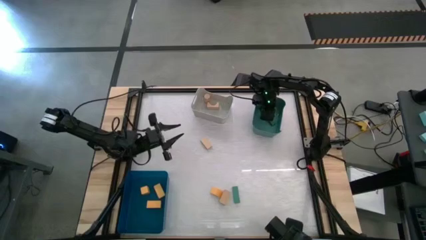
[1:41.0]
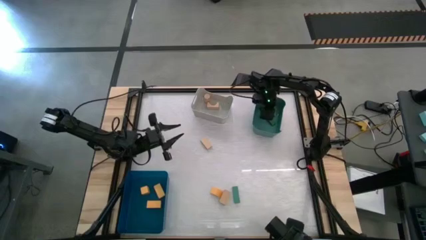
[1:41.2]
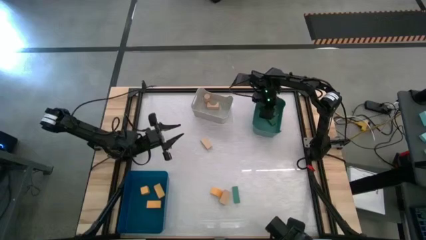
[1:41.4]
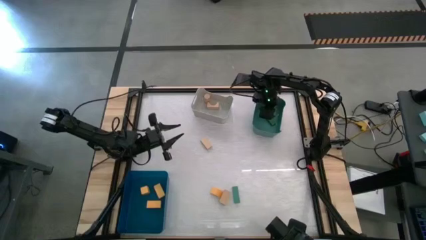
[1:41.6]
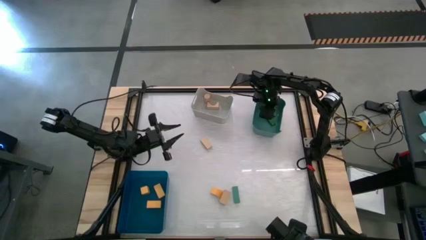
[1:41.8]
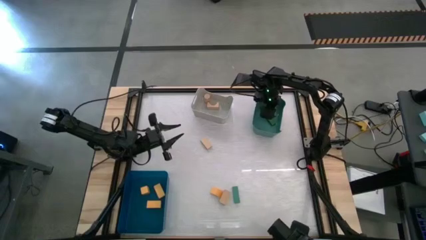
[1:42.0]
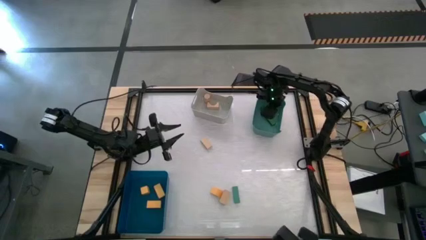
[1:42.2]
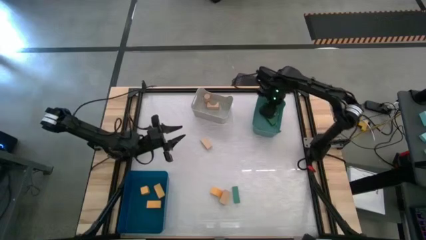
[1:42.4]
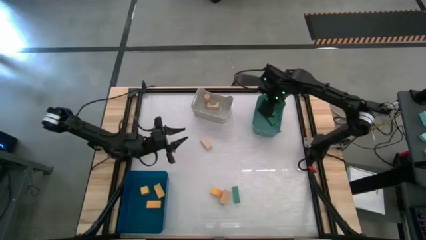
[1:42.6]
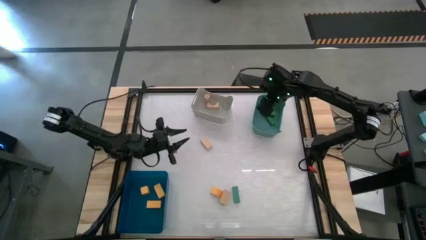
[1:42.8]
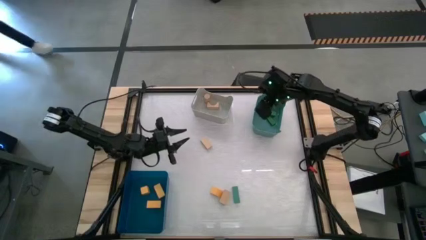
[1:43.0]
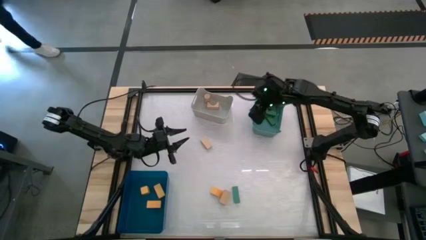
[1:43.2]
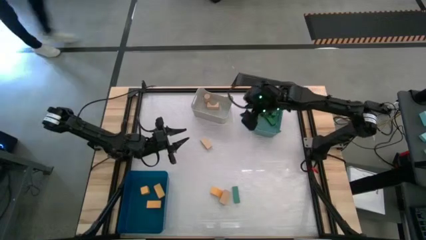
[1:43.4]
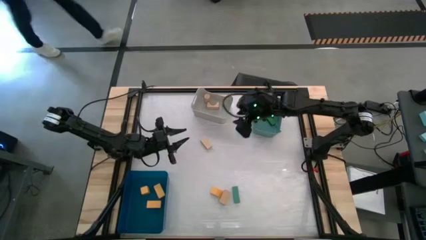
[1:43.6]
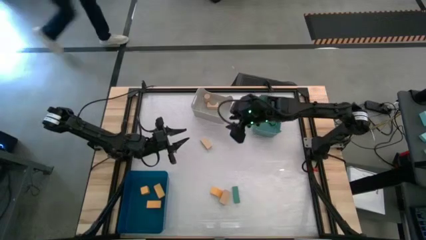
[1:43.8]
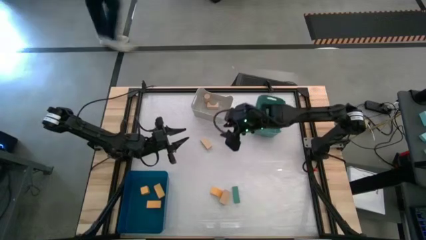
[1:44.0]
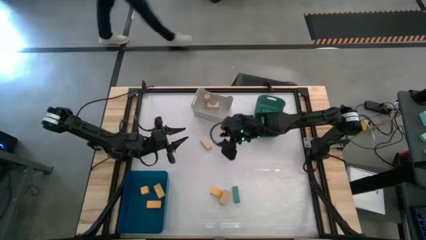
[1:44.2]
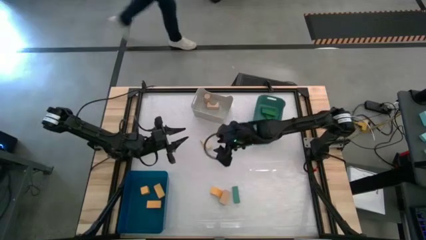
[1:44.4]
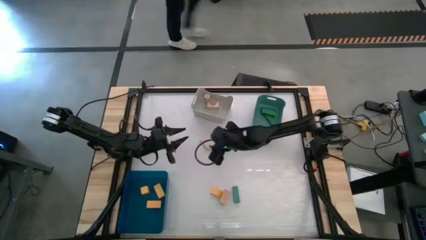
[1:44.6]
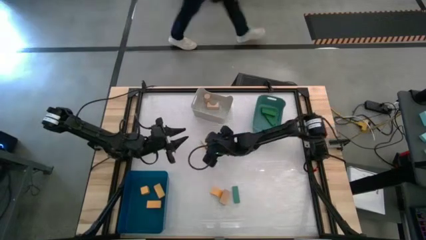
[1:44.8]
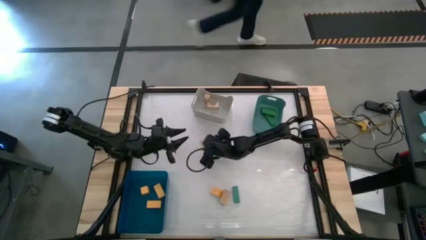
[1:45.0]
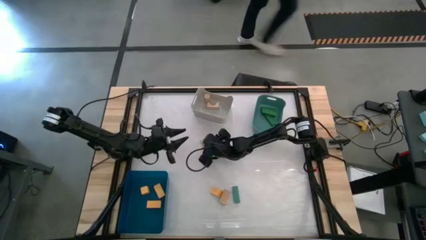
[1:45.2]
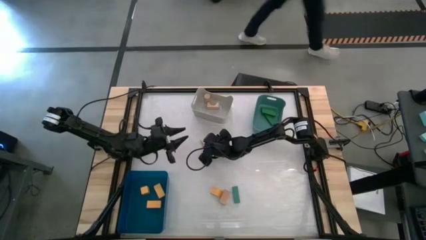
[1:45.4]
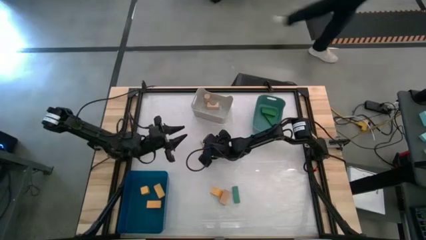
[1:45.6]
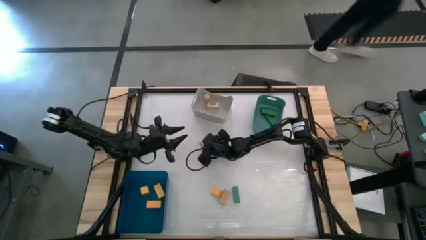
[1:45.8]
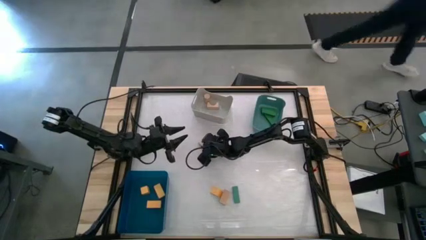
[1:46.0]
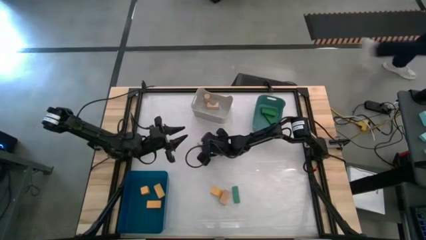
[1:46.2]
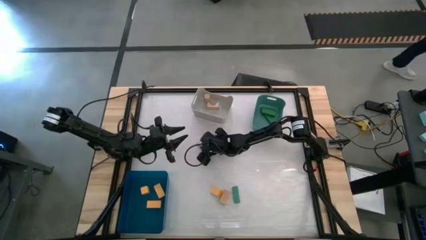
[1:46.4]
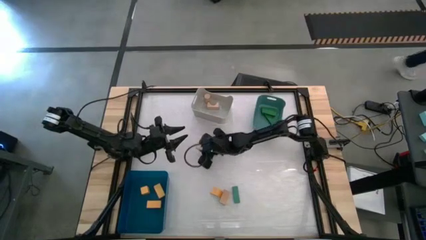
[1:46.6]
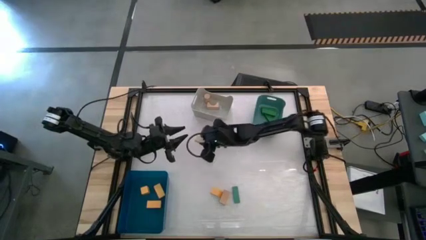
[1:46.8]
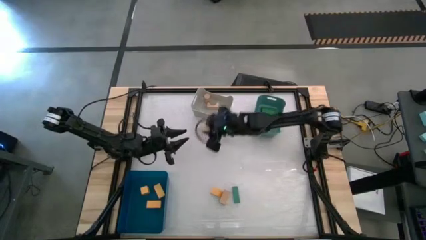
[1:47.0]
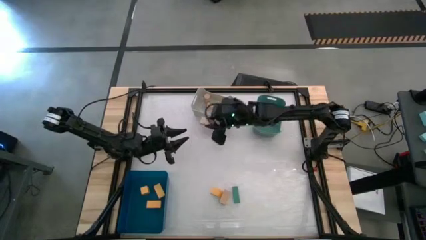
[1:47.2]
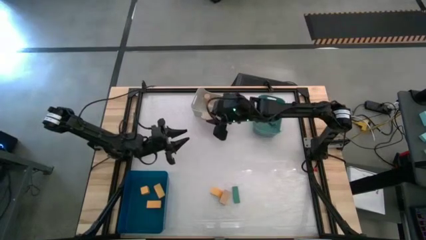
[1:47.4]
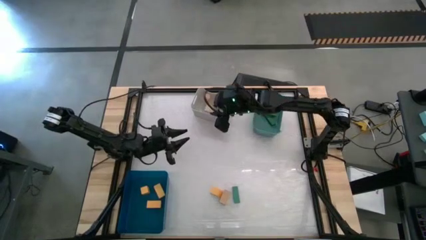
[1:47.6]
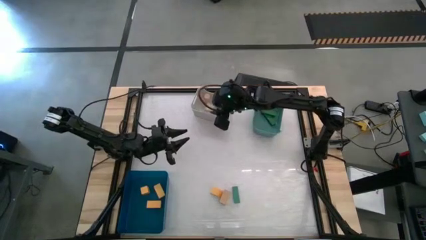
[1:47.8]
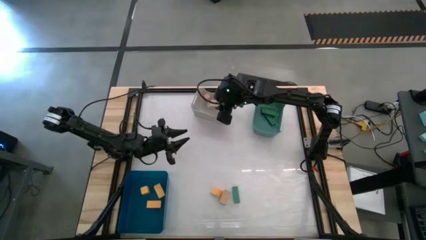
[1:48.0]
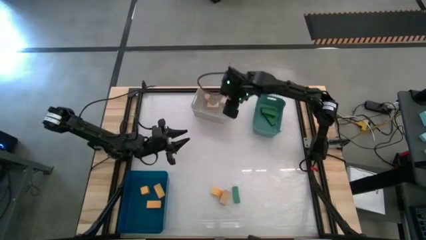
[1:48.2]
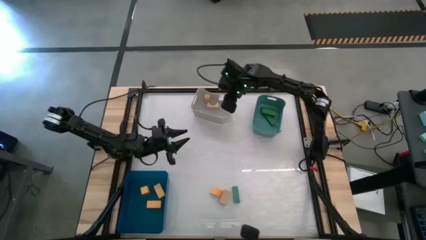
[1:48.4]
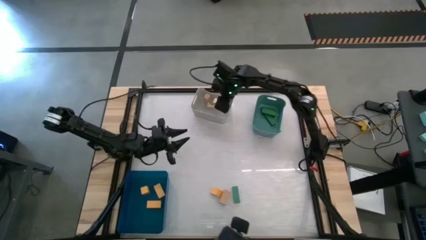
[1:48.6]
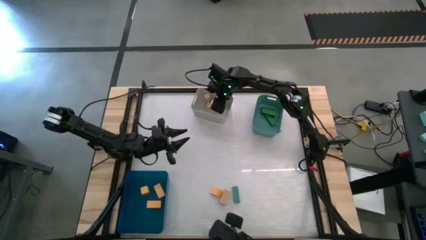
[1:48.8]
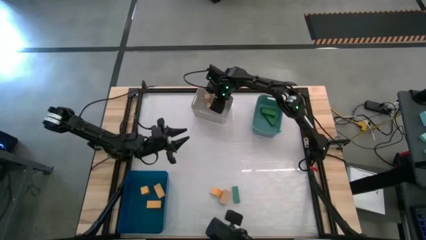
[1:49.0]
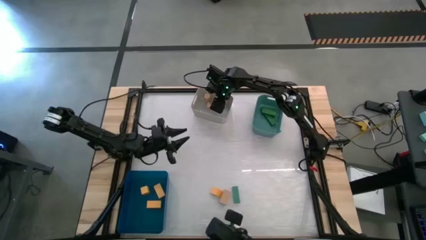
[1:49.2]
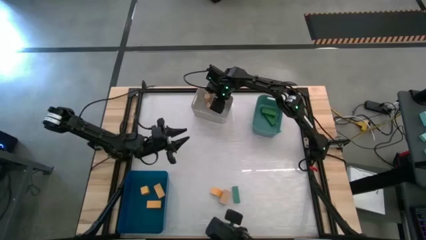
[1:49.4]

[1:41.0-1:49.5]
Task: Sort & place blocks by color
Put the brown block into the gray bin

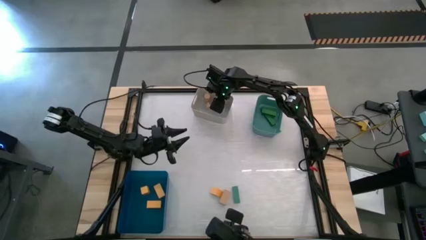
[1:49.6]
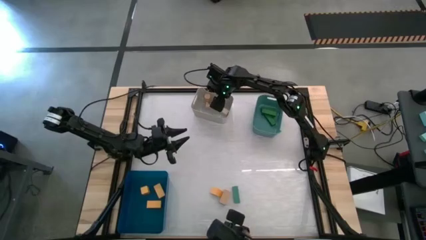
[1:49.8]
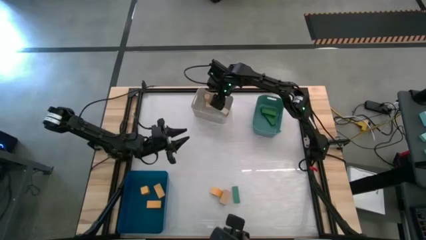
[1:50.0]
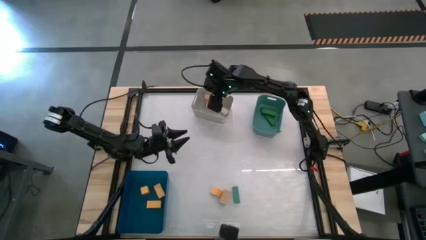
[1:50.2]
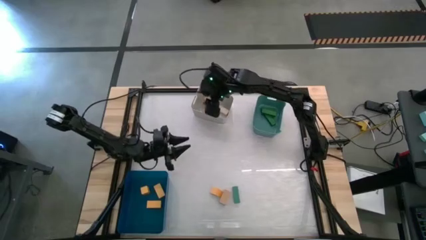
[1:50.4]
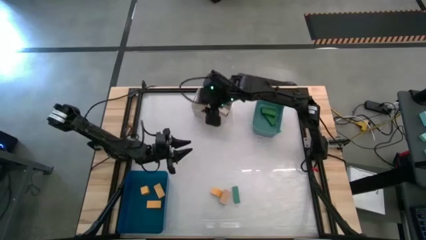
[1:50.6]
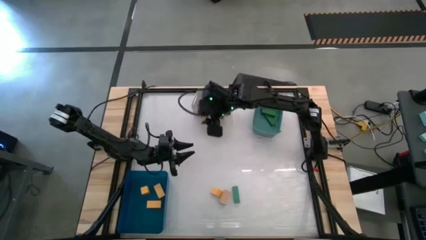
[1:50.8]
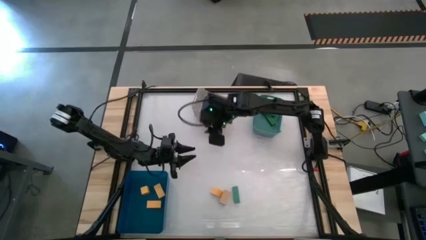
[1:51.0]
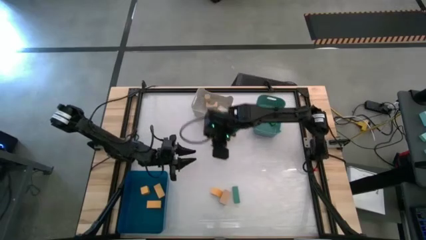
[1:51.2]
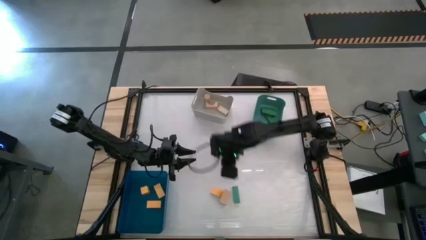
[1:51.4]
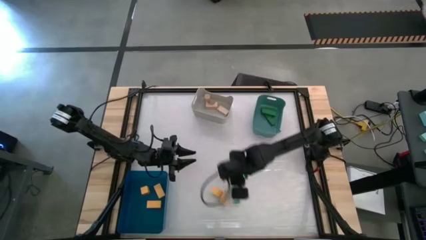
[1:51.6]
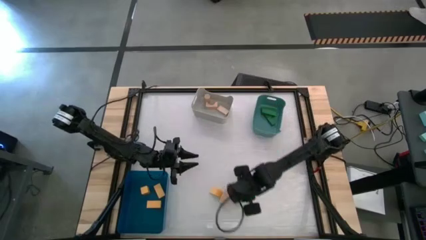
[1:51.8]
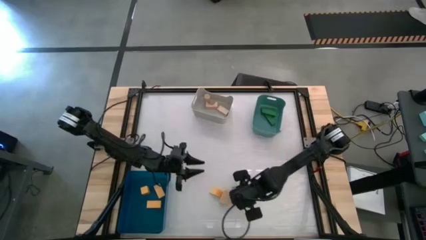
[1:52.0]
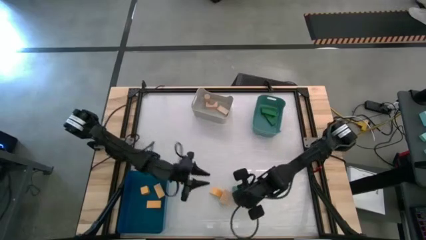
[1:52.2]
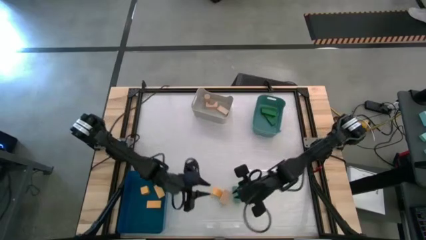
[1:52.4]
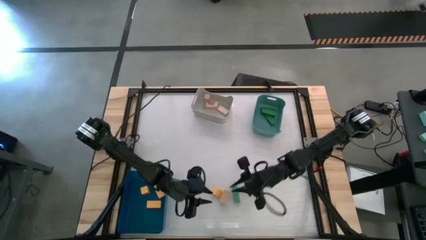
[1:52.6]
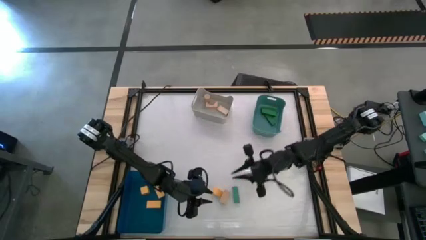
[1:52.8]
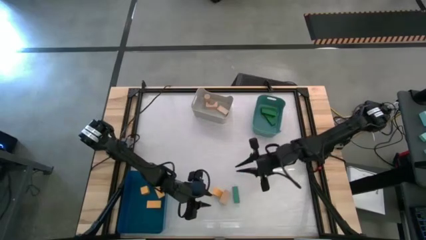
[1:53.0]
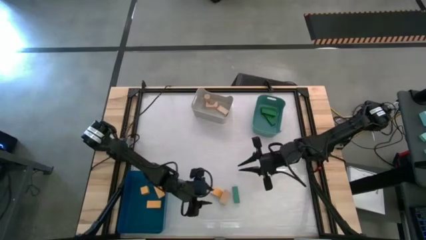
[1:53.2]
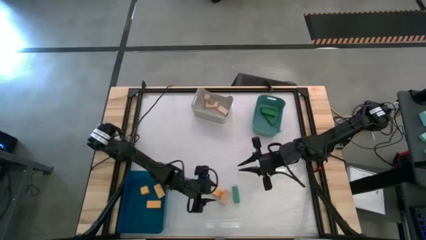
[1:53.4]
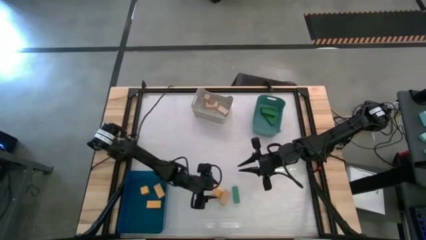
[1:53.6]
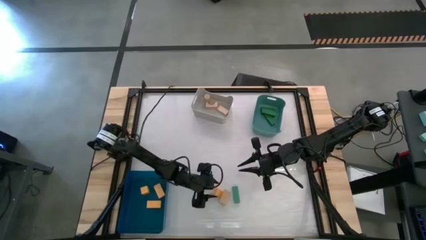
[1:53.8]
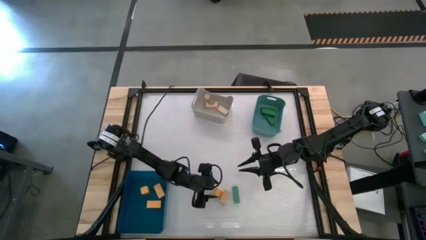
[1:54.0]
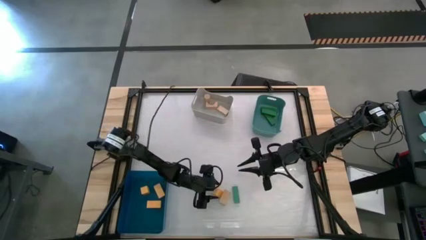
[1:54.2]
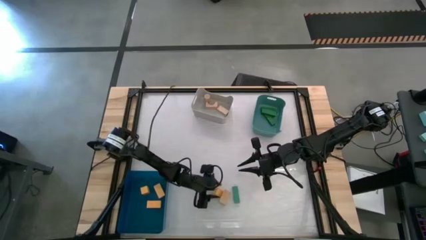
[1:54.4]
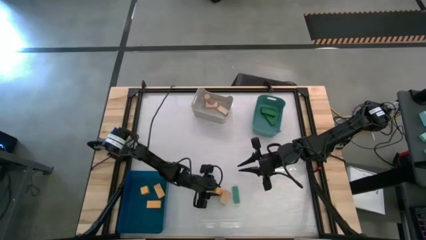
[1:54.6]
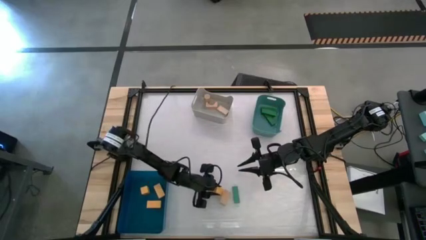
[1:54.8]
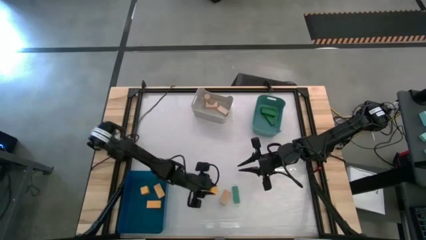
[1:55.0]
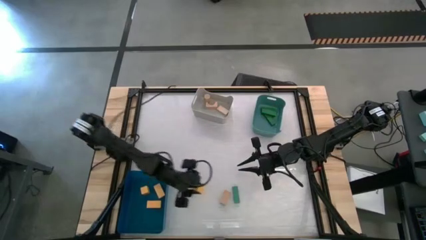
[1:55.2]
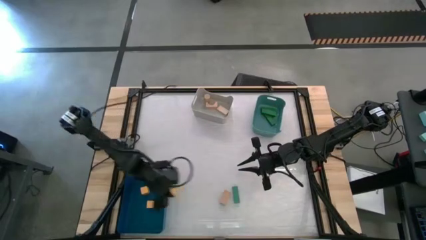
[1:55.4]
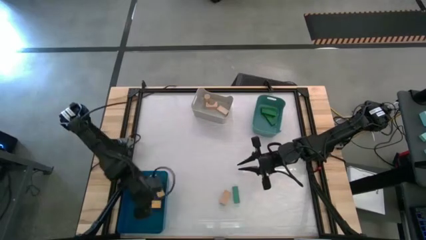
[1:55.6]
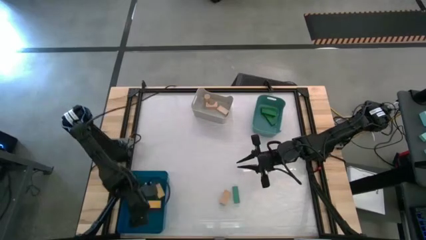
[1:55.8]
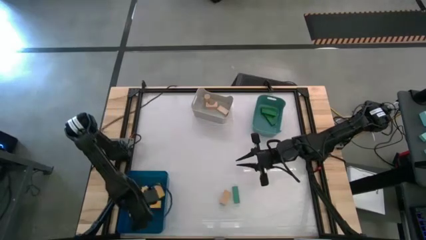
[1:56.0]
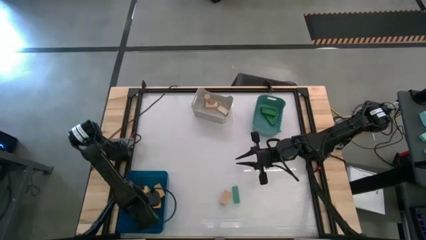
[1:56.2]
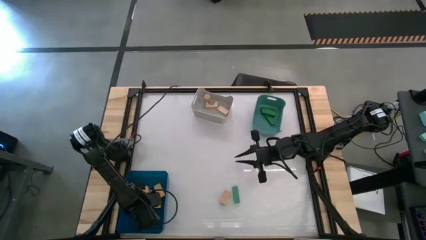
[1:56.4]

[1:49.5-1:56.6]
Put the yellow block into the blue bin

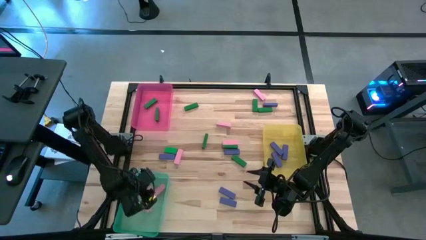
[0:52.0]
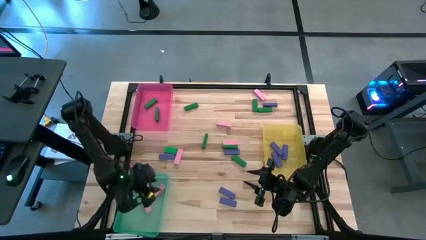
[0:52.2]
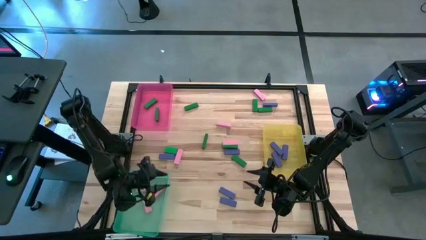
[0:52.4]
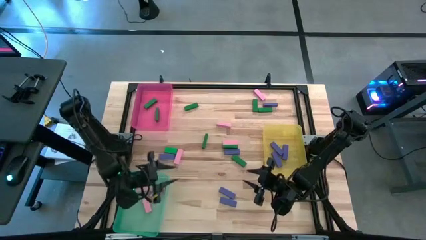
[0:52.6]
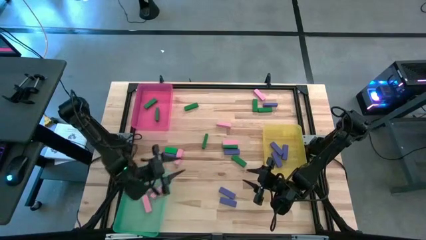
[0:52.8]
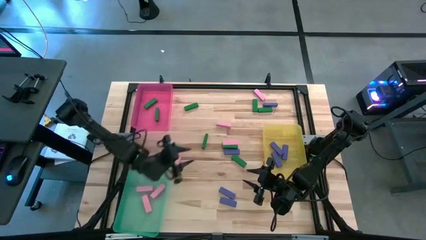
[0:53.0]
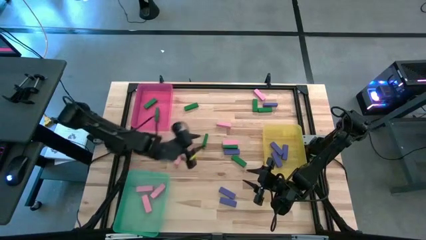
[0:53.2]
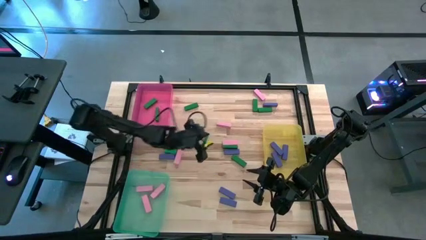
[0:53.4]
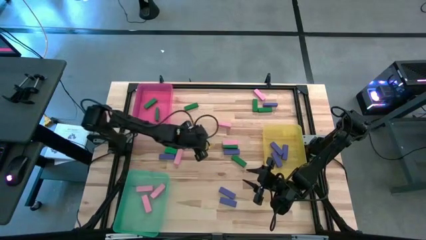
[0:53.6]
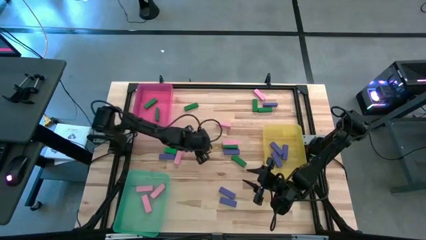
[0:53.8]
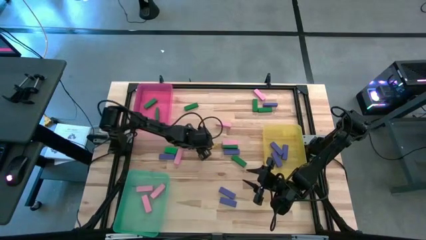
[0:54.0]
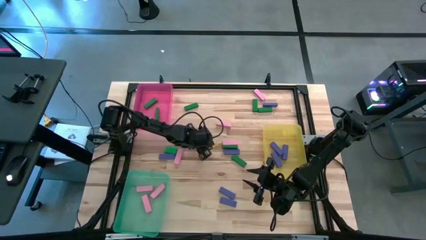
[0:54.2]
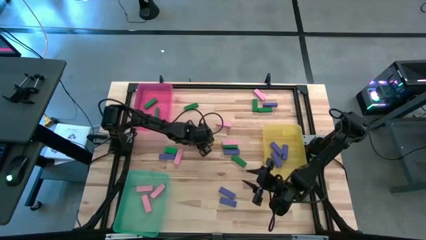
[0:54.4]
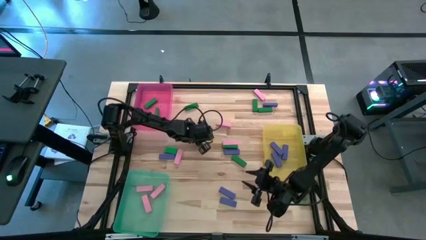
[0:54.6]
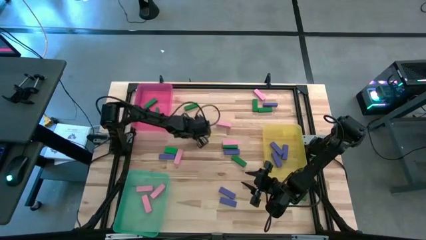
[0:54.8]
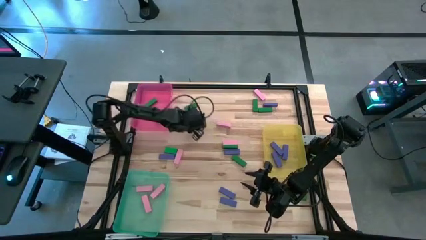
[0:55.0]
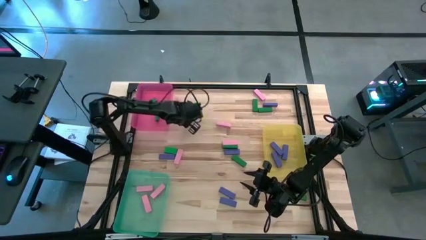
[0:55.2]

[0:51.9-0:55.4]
Task: Sort blocks
Put the green block into the pink bin
